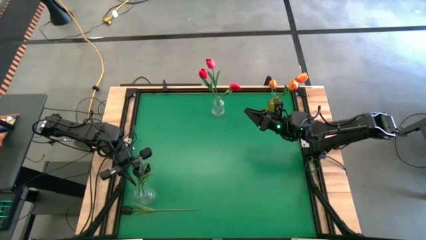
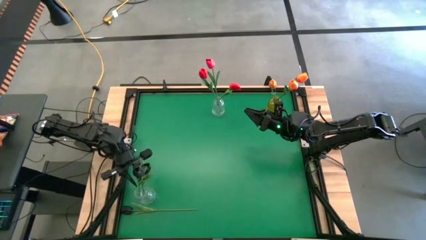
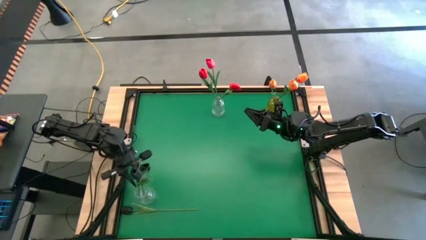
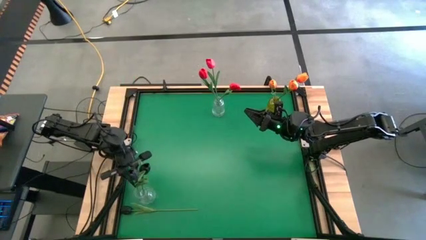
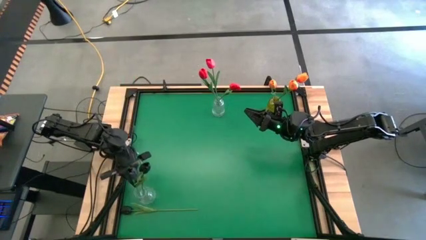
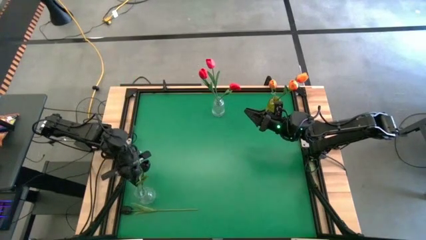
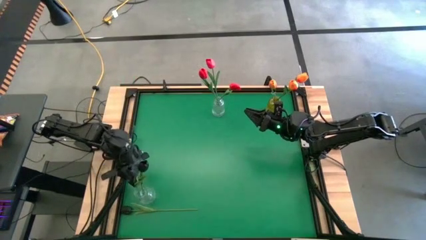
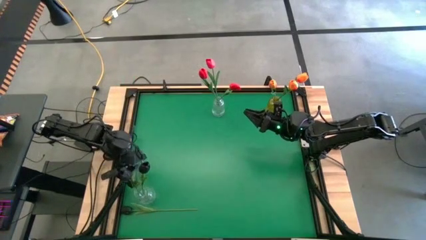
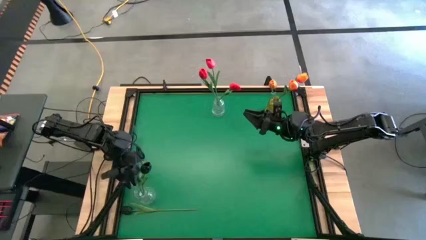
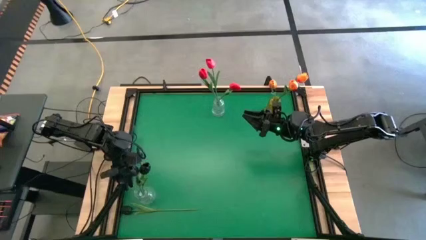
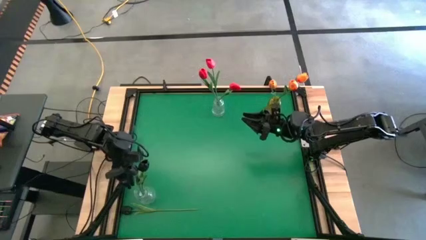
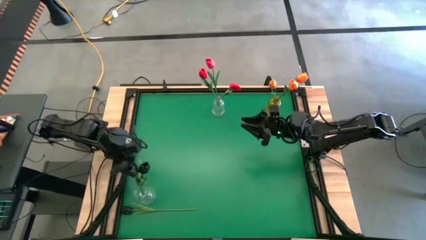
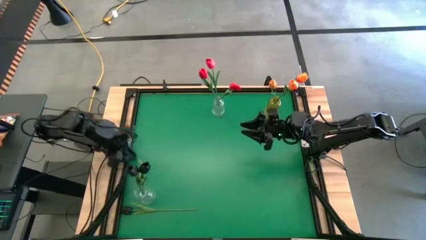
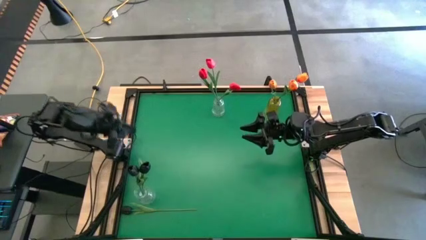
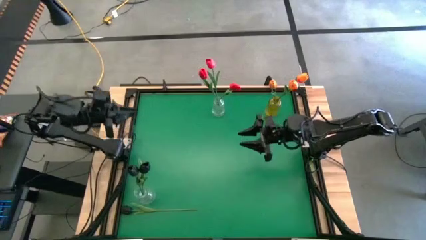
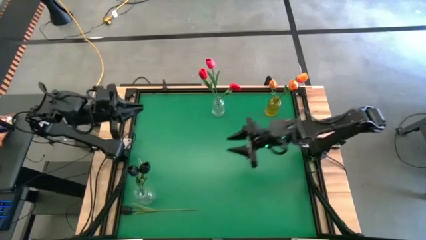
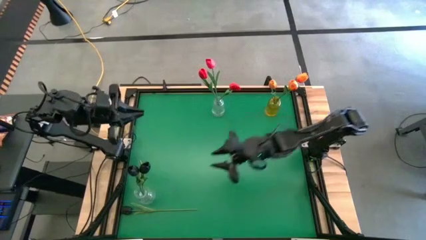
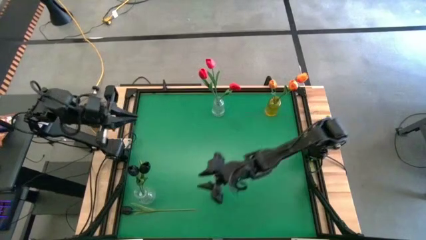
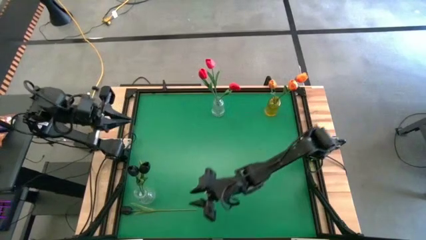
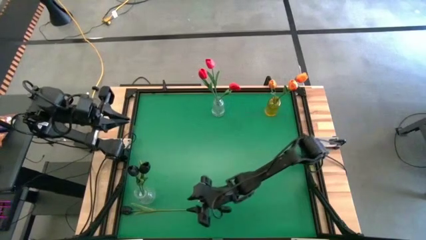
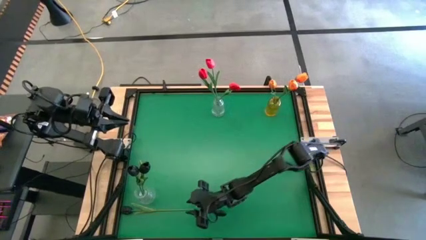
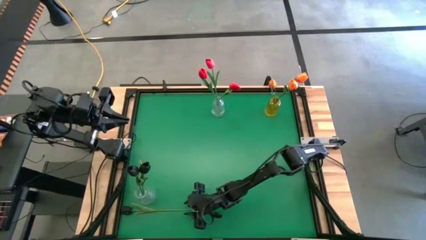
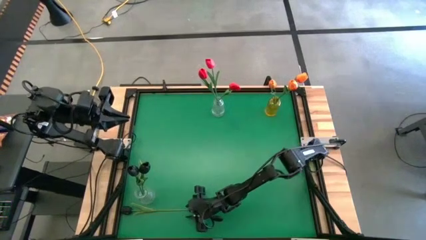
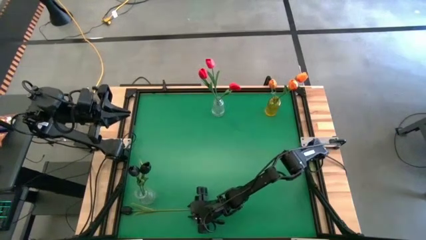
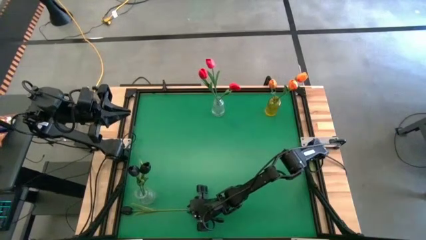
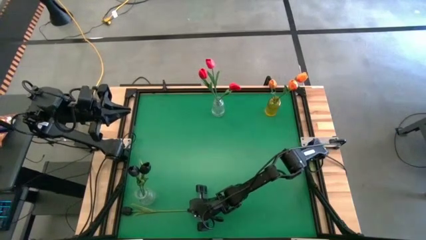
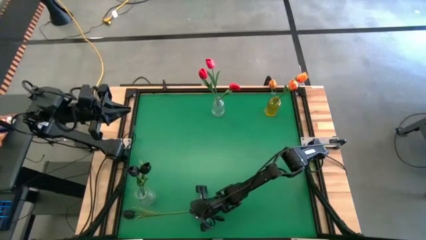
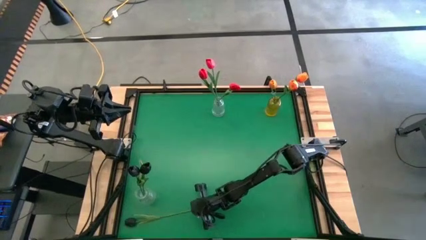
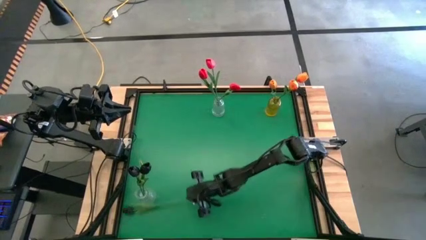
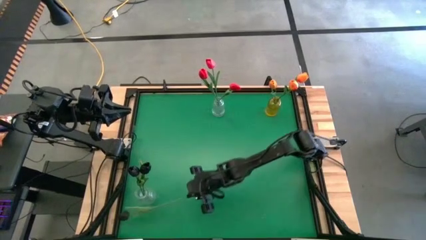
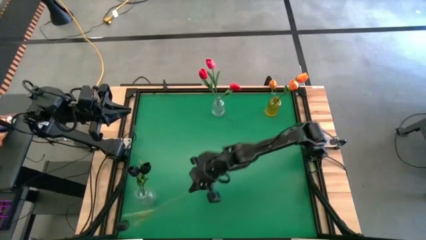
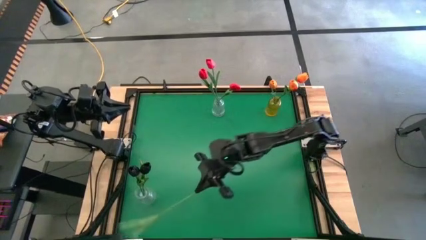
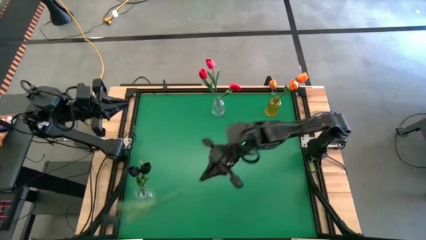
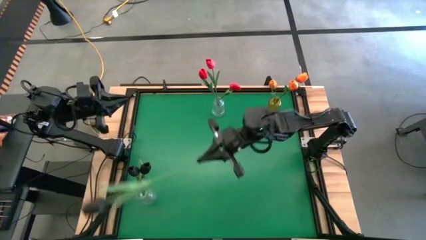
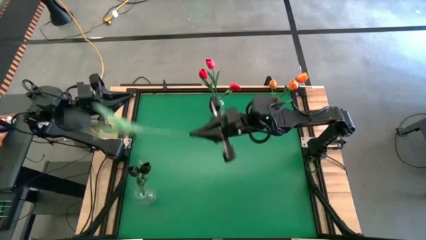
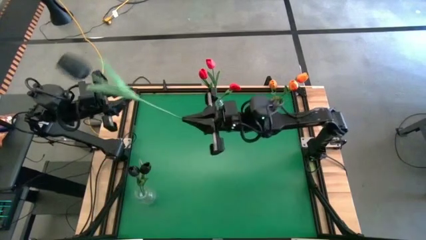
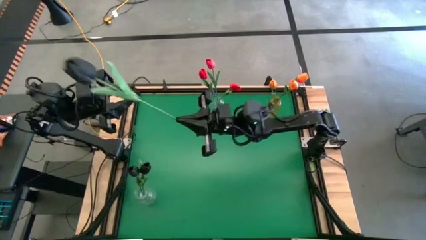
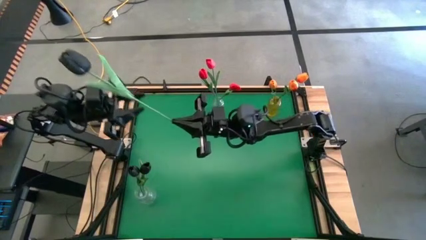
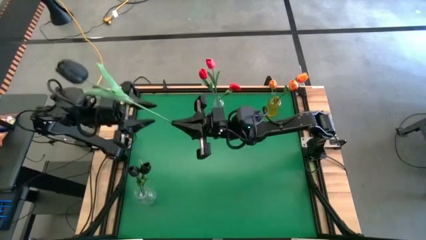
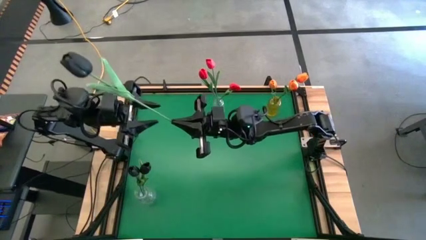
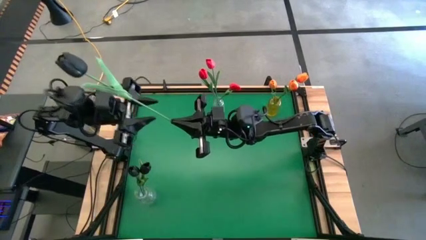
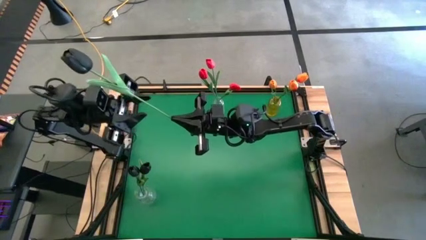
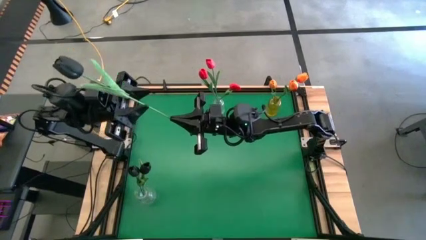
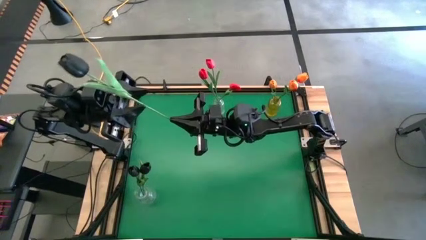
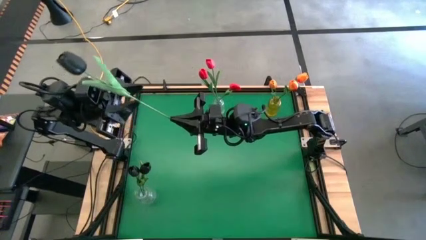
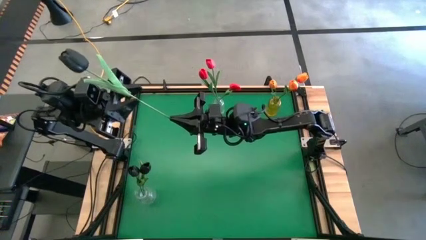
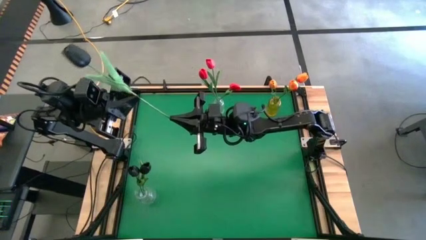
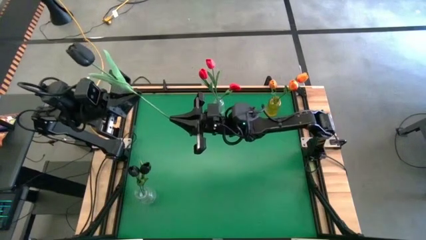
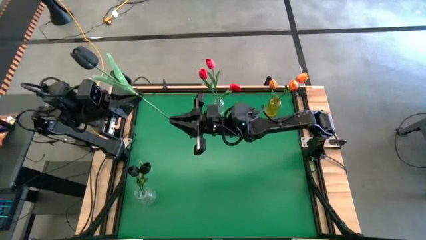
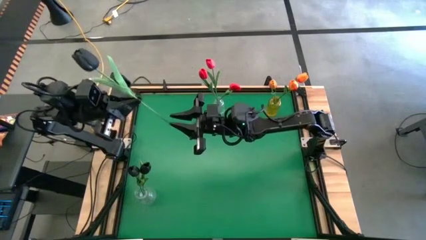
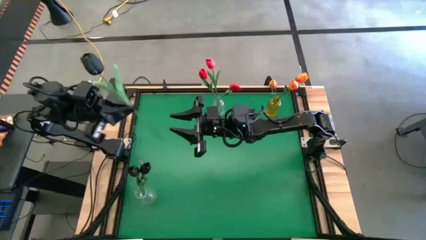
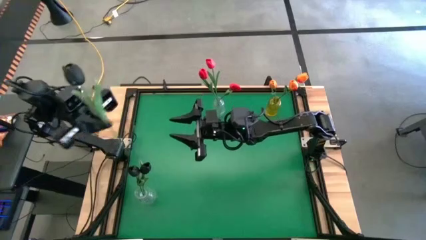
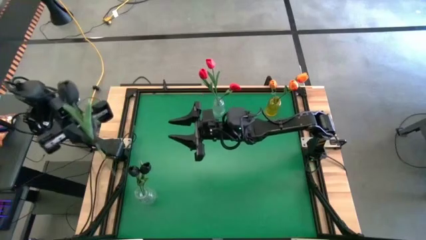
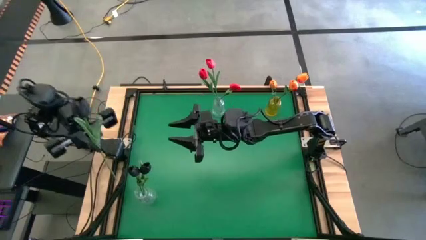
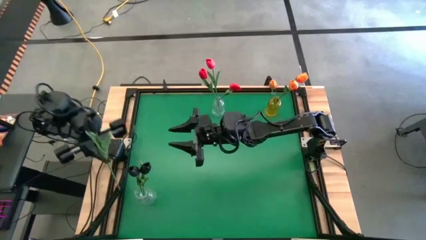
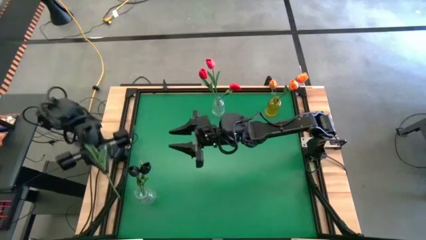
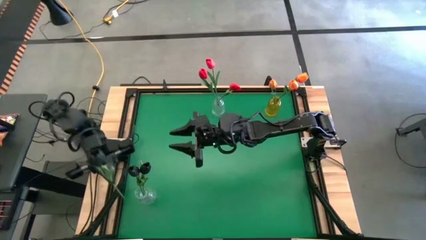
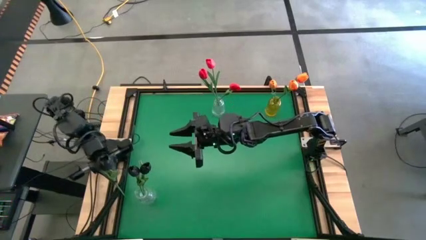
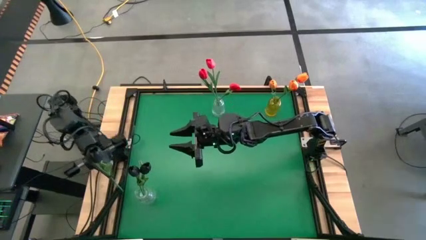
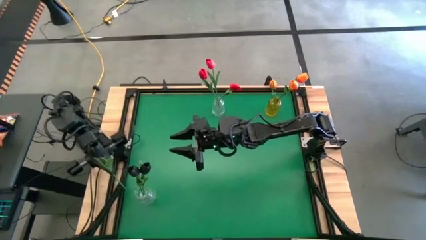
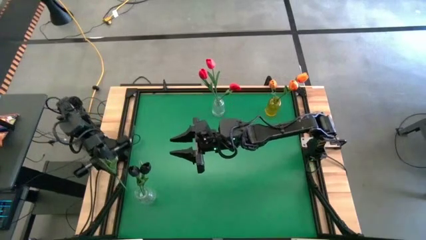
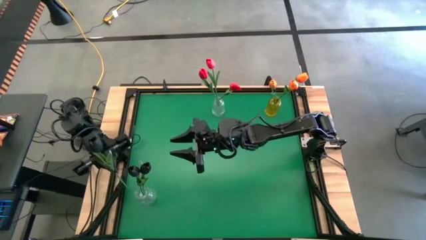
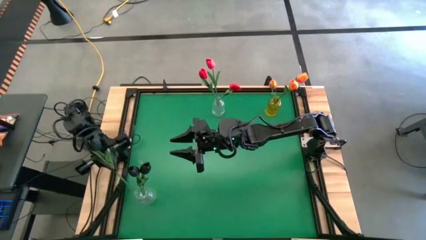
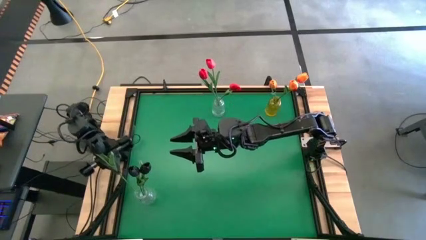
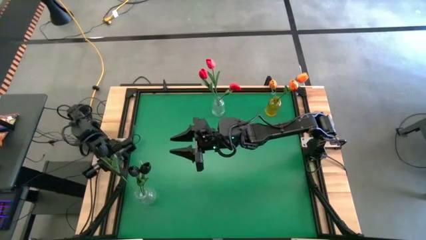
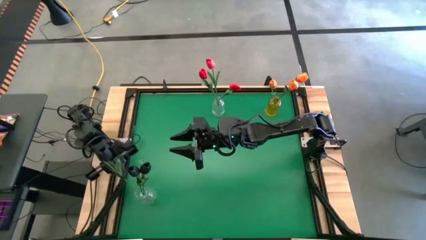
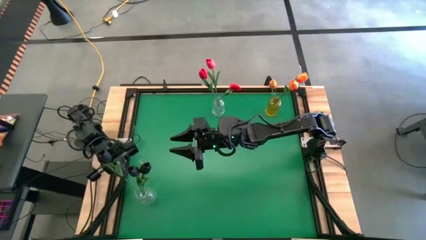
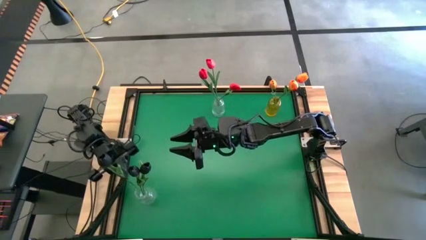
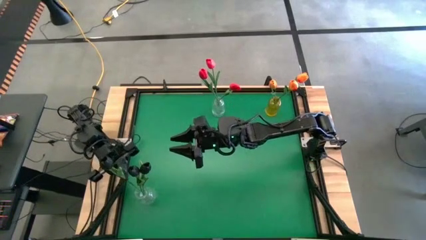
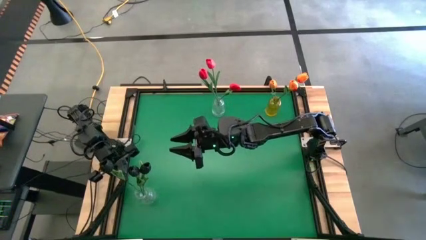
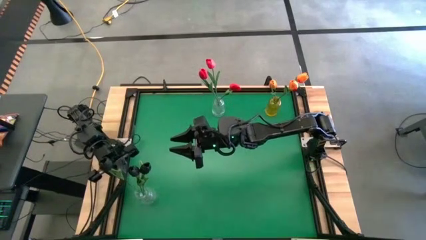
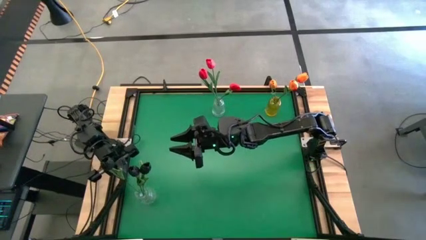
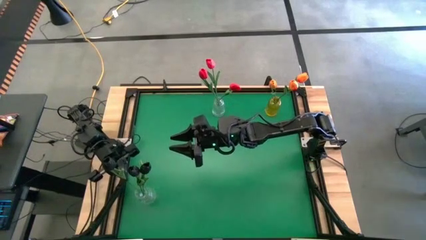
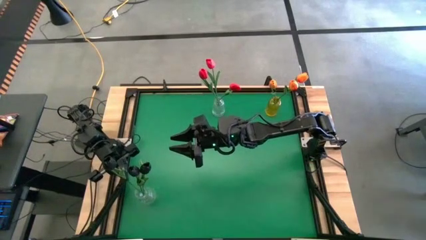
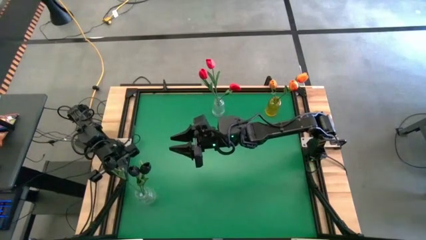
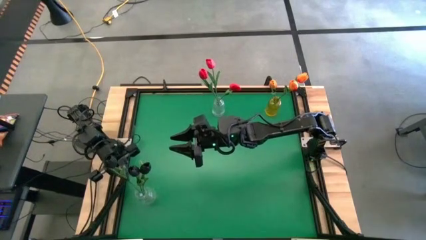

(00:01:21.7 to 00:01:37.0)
Task: Sort flowers into vase by color
Put the black flower into the bottom transparent vase
